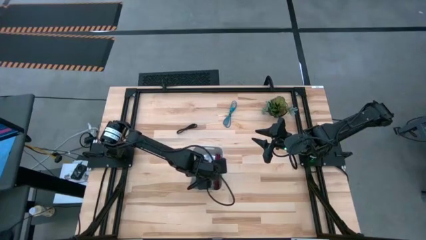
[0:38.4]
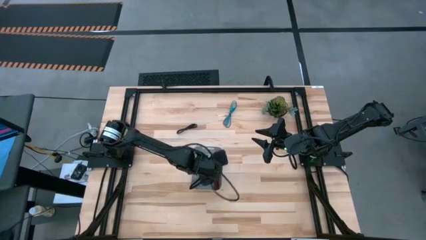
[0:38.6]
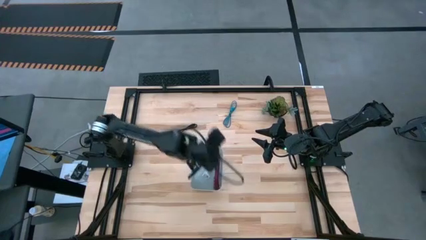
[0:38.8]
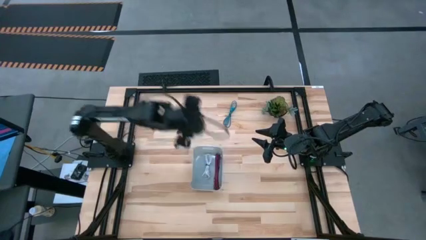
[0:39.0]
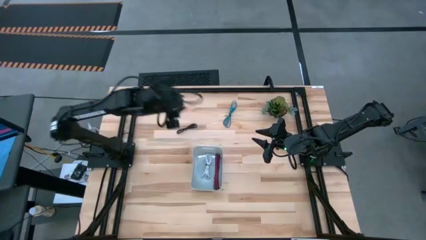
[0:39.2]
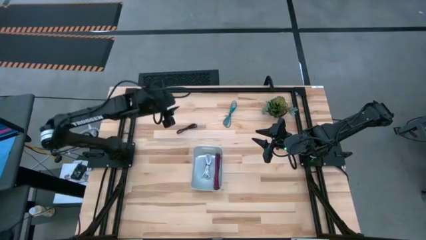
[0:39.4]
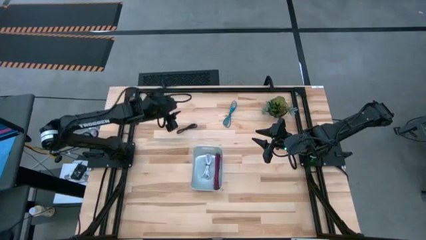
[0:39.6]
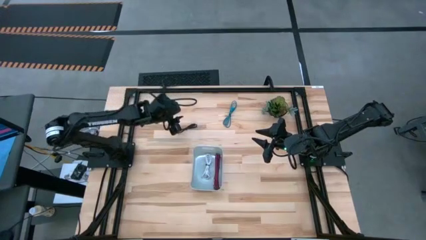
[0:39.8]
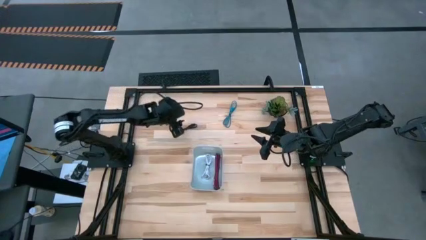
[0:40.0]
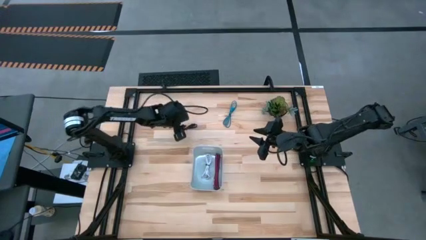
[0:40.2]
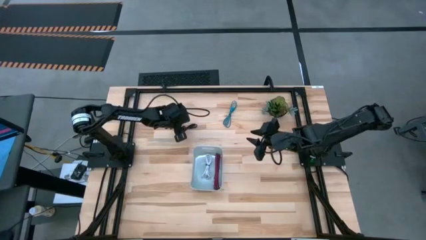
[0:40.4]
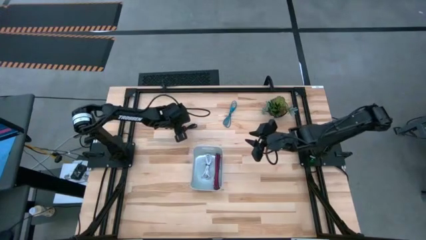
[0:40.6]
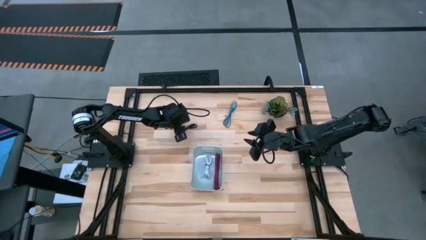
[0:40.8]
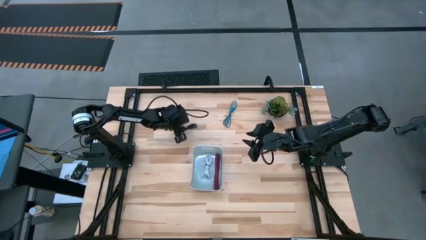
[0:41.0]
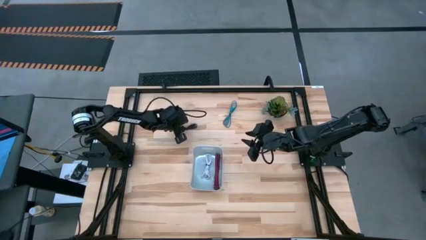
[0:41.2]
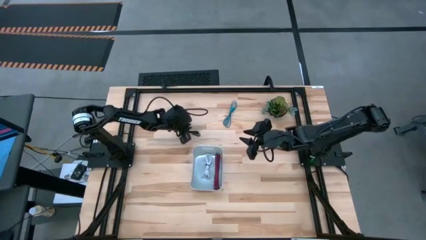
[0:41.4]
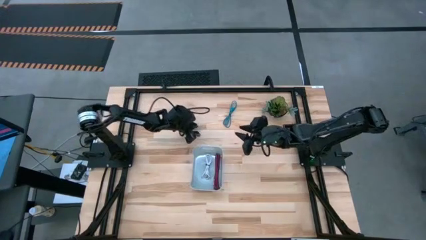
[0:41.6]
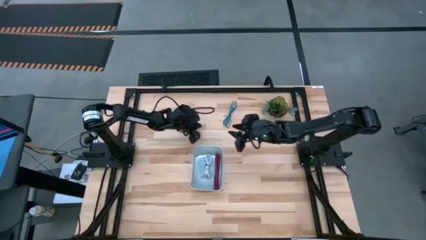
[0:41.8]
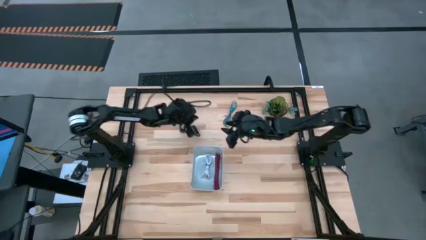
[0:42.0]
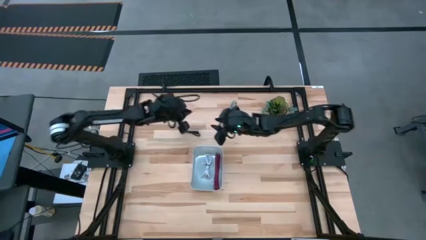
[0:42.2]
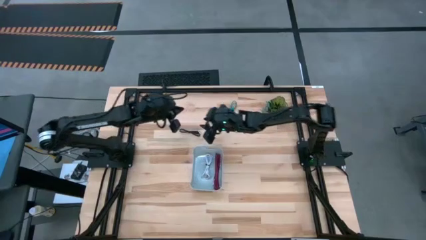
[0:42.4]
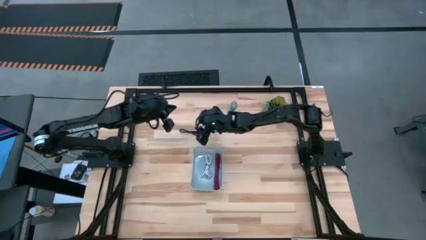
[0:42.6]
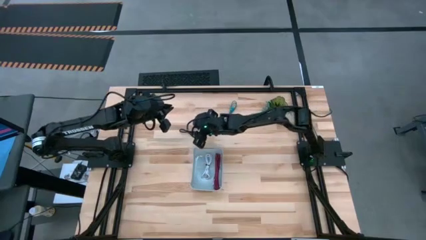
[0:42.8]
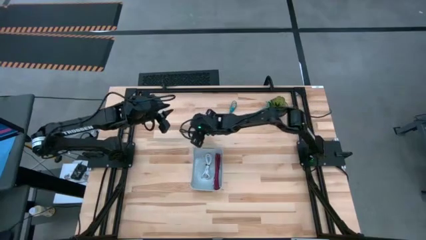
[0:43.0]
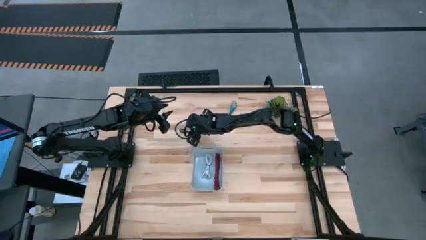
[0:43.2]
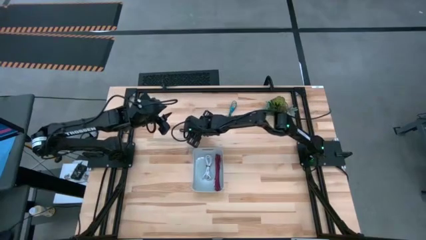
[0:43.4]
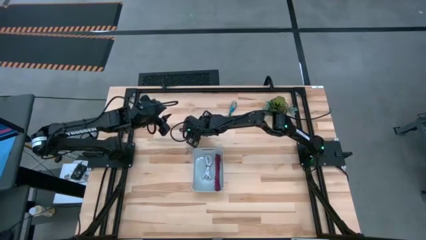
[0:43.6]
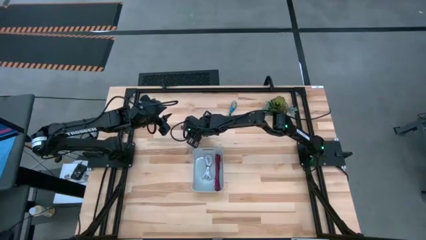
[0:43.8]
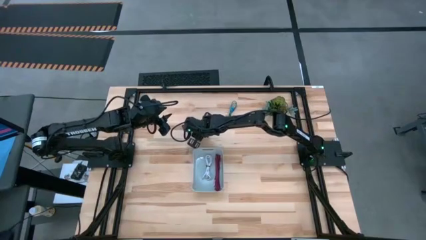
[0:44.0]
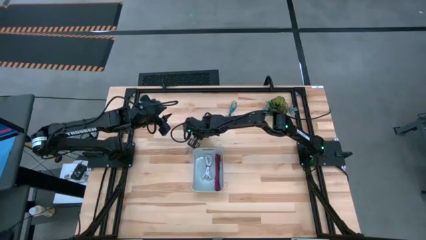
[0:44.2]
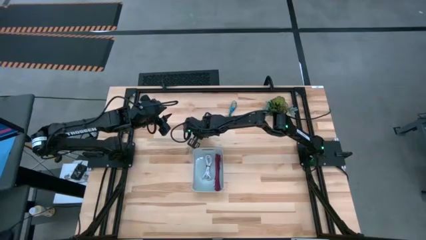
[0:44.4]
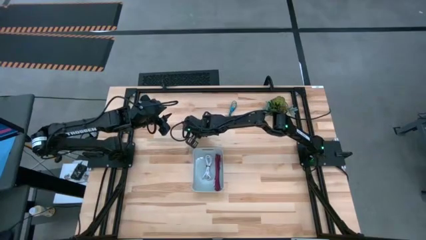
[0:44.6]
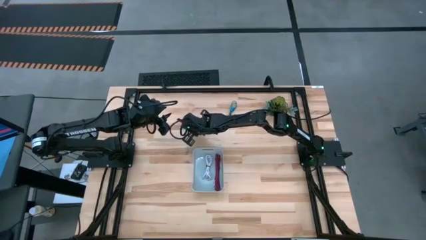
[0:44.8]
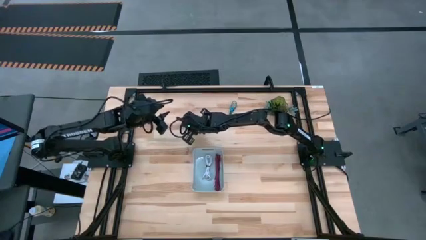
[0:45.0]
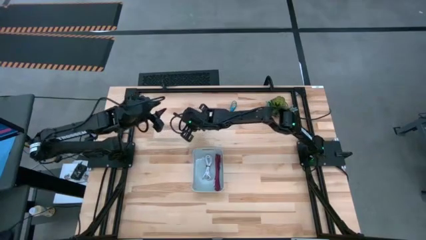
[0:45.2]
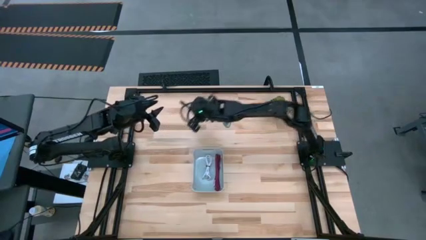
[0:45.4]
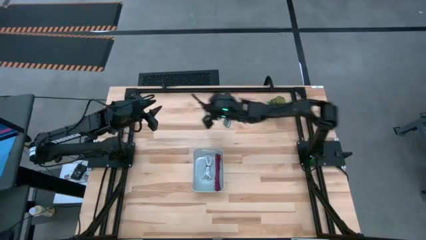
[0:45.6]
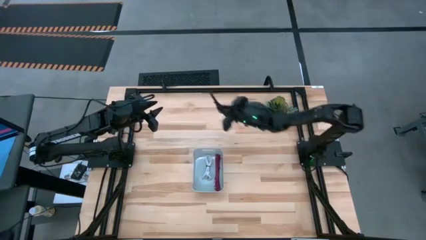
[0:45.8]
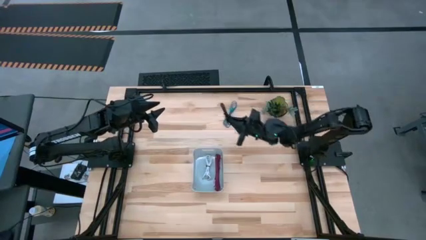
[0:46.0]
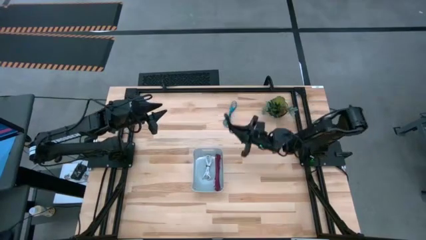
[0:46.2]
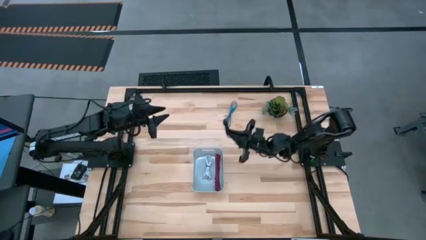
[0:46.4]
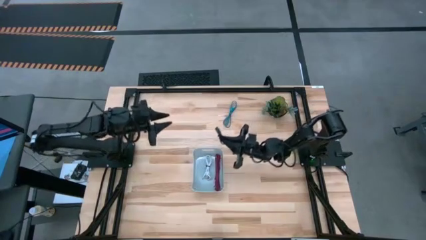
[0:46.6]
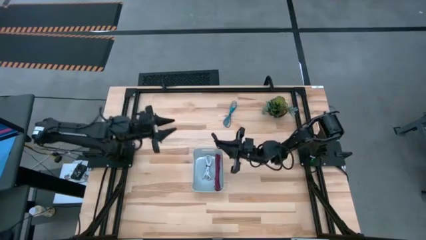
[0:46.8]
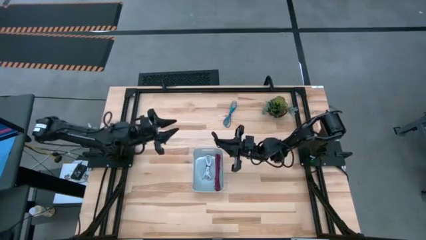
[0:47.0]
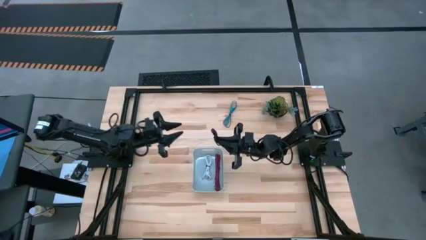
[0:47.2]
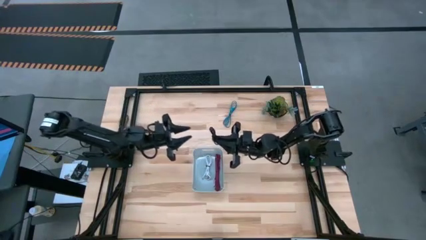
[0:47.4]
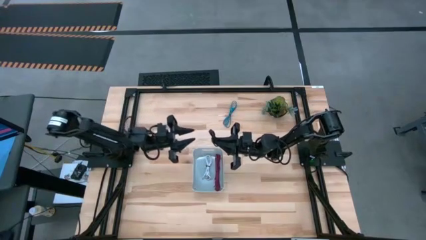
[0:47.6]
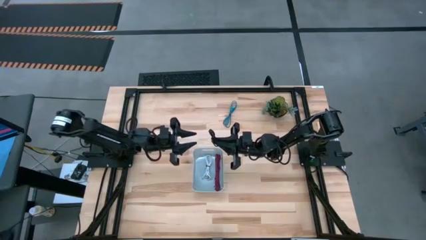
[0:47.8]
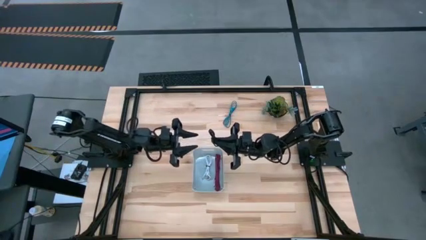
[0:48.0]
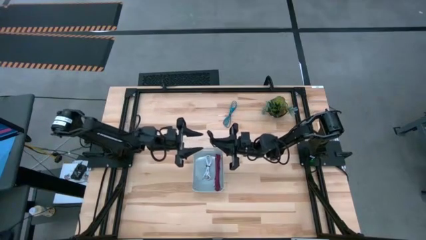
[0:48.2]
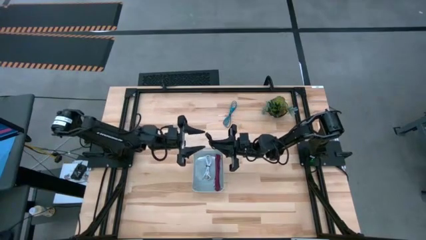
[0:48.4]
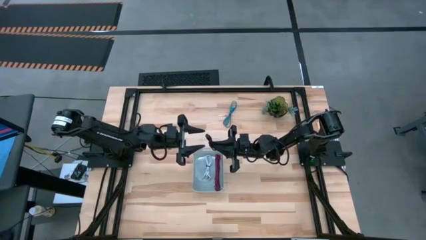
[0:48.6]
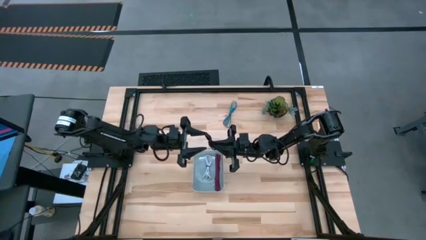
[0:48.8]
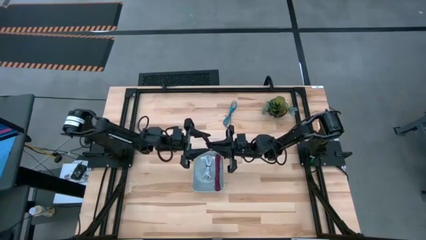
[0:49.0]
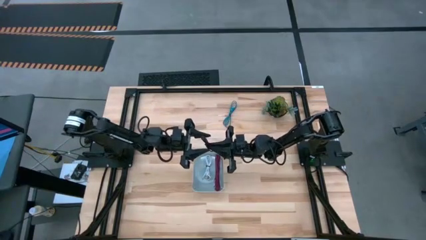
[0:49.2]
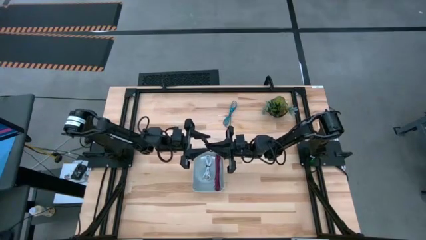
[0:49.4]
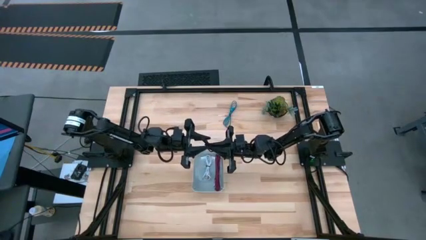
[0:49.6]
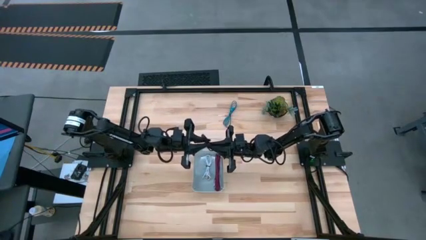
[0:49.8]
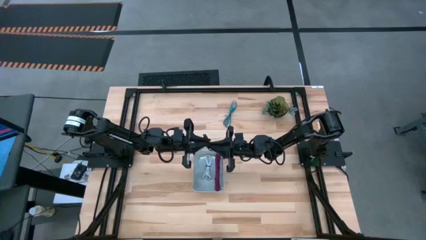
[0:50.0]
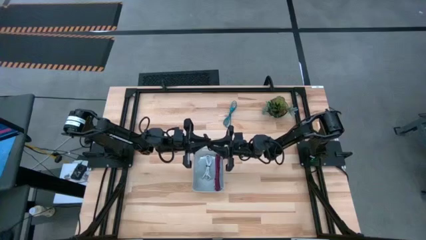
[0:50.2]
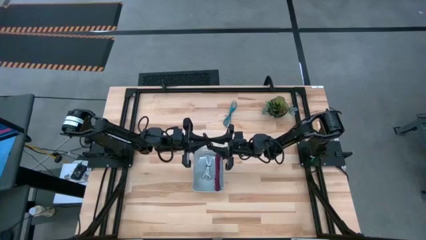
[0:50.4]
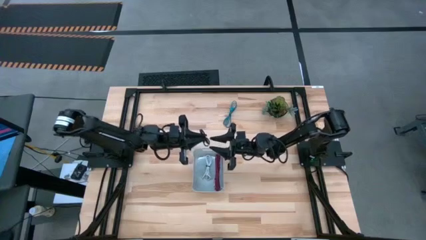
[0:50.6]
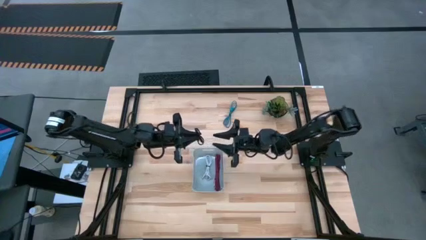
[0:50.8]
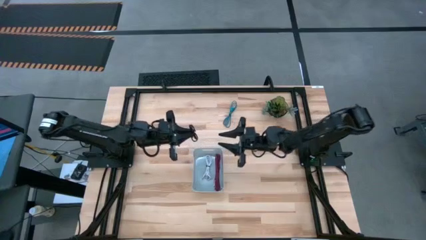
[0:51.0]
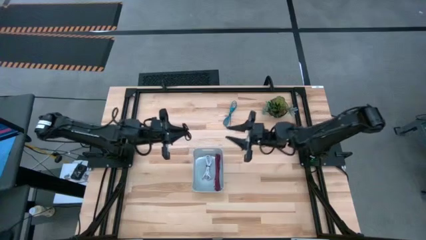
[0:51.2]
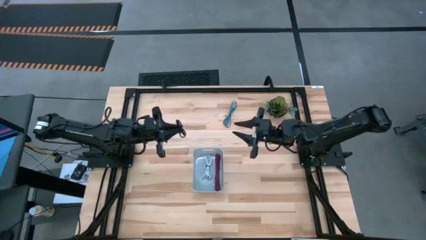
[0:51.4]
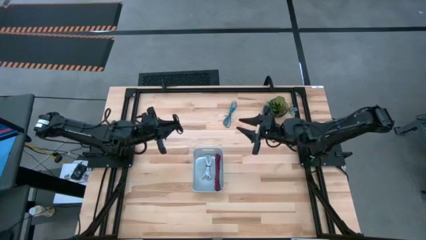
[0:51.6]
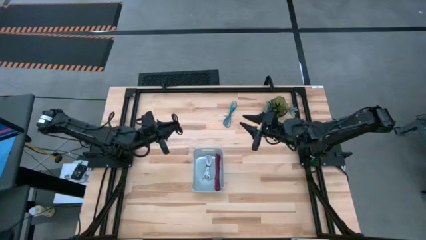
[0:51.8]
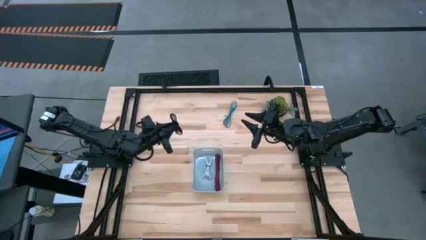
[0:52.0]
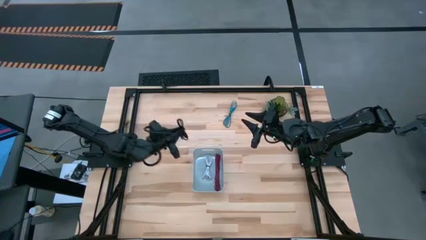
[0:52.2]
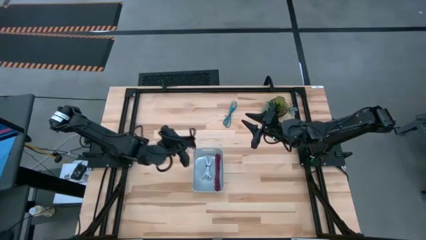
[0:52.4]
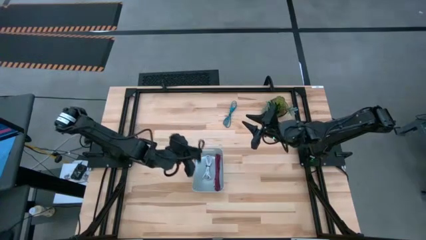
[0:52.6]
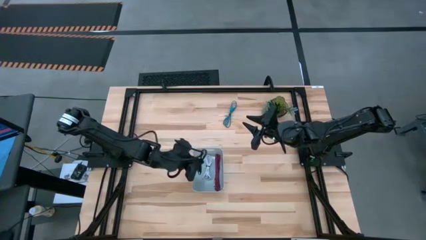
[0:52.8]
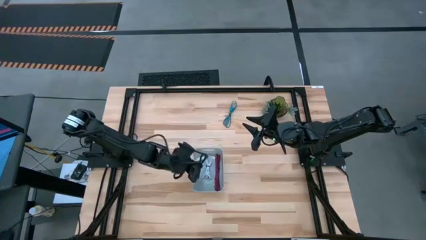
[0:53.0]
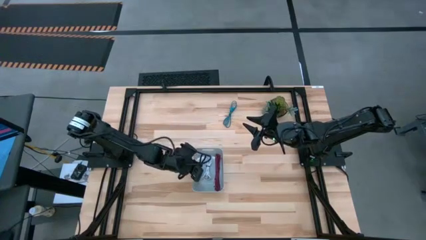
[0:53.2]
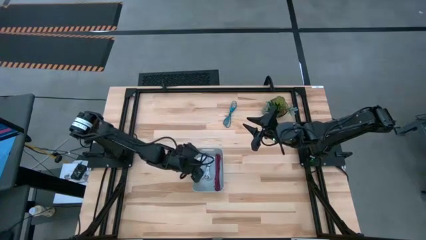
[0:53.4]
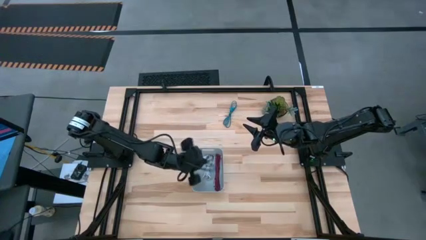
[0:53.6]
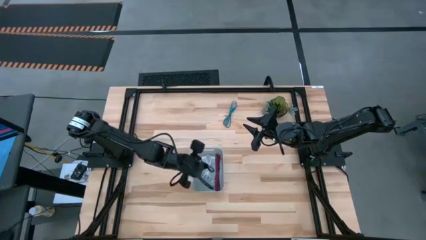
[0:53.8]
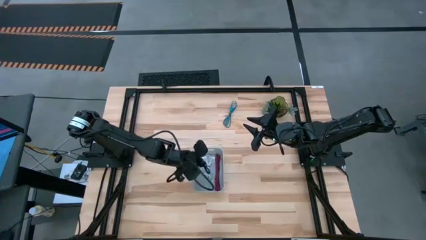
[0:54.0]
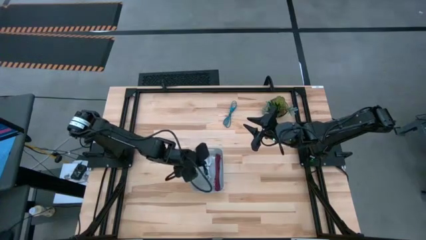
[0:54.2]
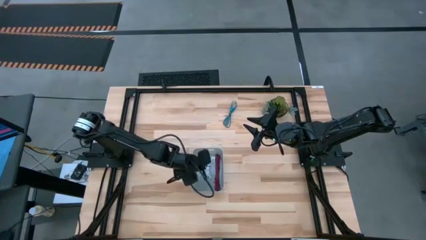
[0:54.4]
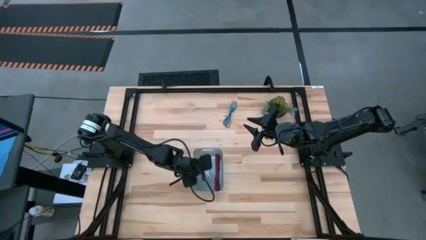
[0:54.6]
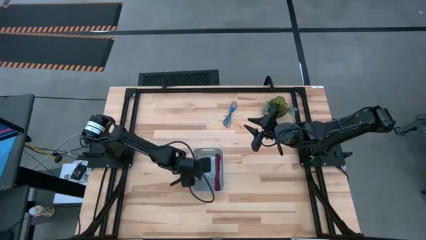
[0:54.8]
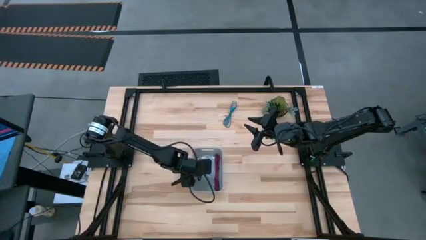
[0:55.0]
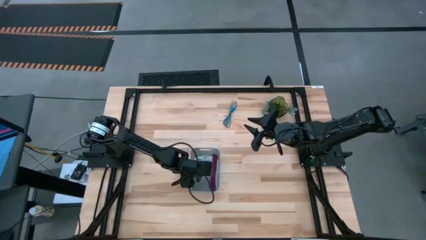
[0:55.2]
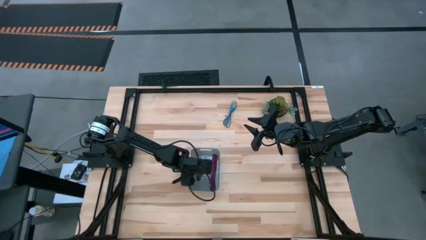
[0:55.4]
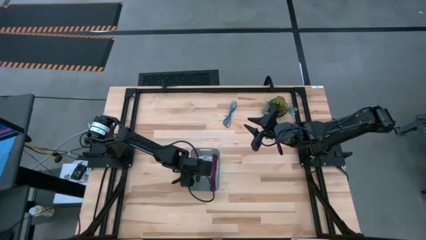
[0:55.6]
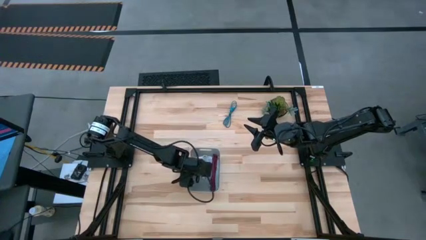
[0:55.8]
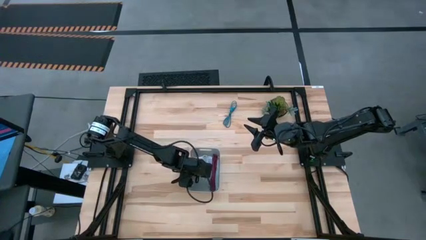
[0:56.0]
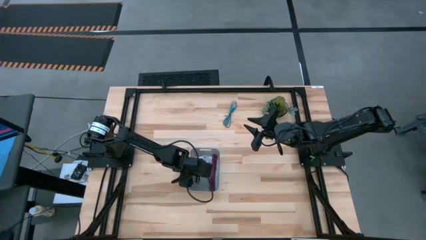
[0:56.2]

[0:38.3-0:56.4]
Task: Pick and place USB-C Cables
Put the black charger cable into the gray bin
